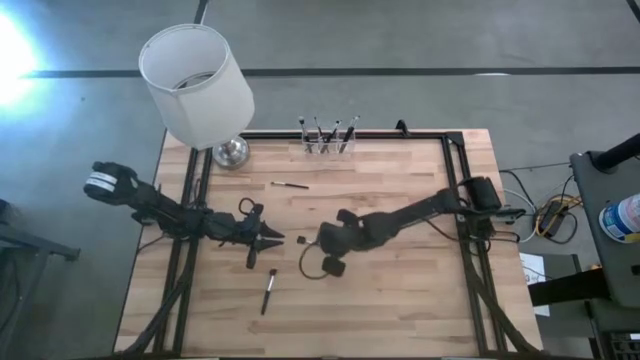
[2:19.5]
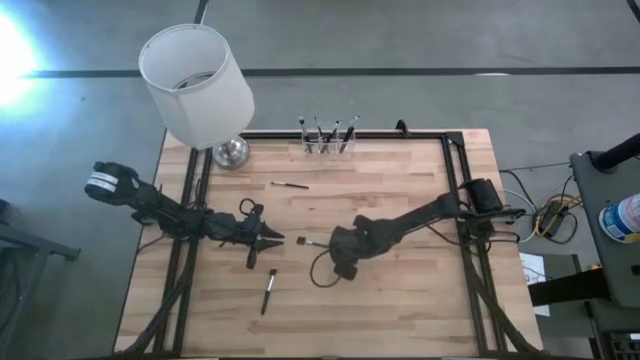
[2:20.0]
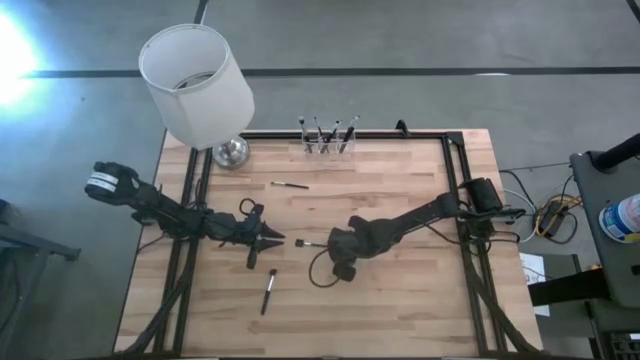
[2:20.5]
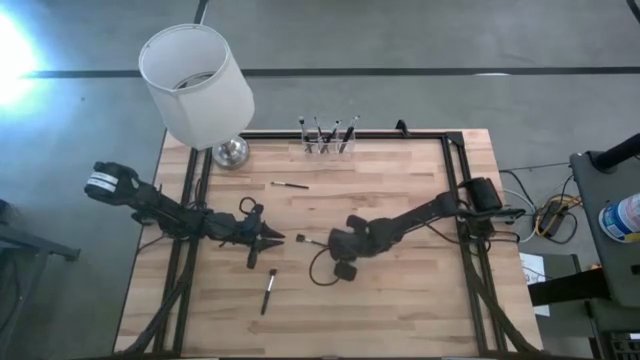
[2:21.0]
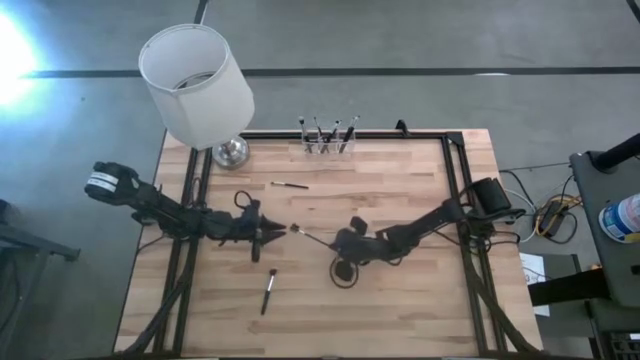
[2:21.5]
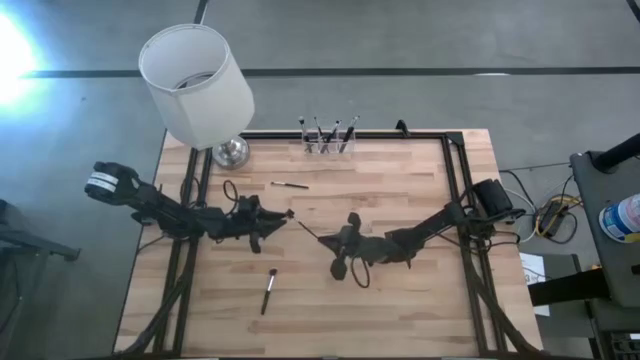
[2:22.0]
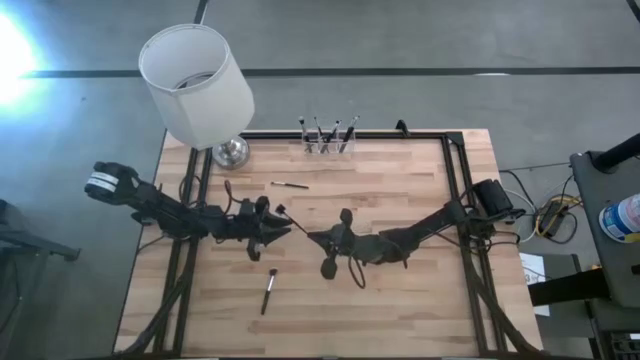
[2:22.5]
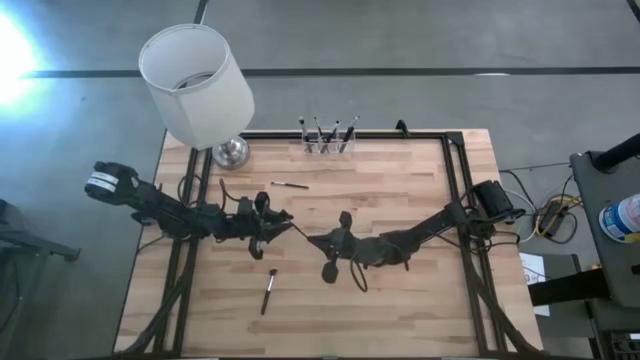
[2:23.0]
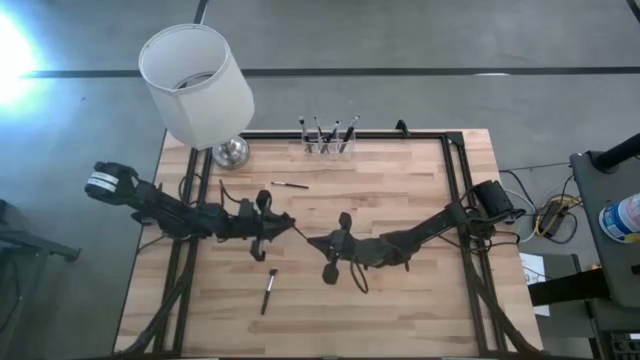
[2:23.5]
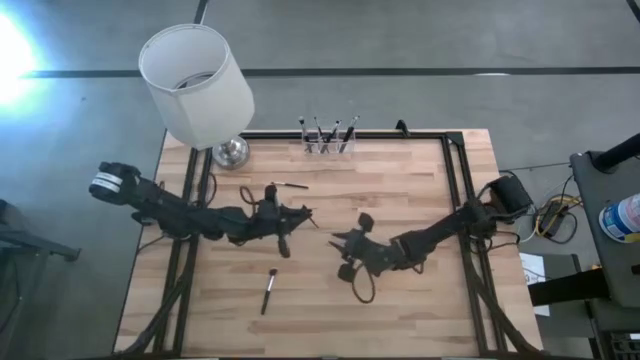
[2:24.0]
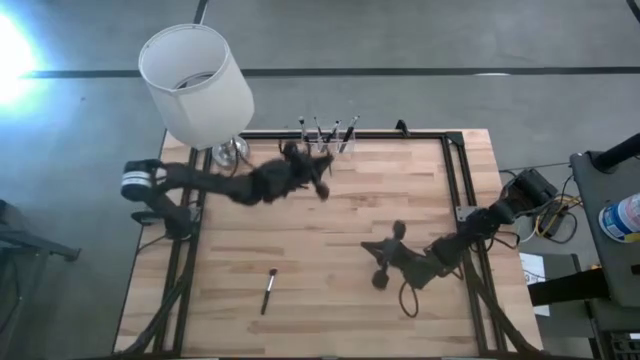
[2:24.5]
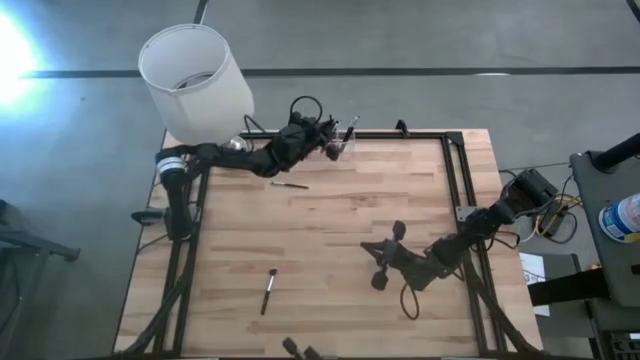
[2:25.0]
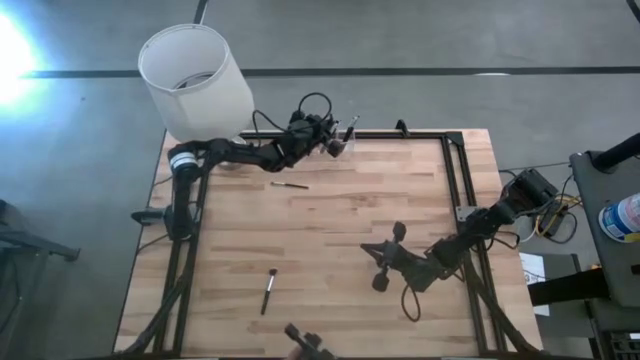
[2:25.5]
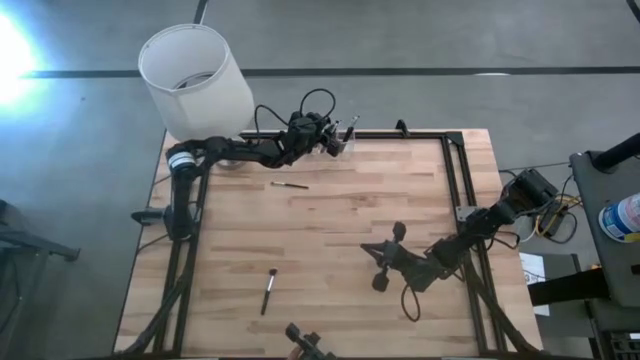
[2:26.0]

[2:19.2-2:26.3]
Task: Put items in baskets/containers
Put the eye groomer brush into the transparent organizer

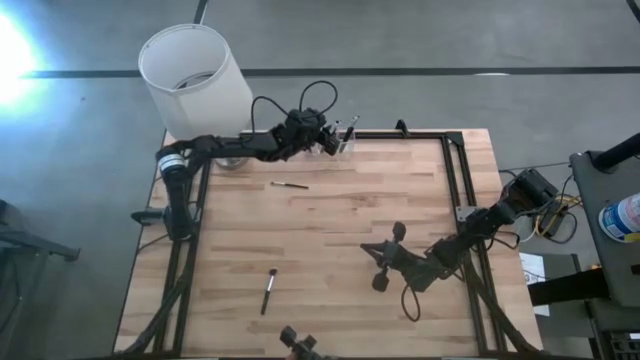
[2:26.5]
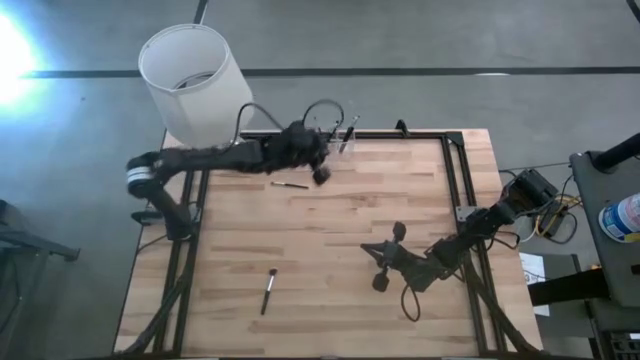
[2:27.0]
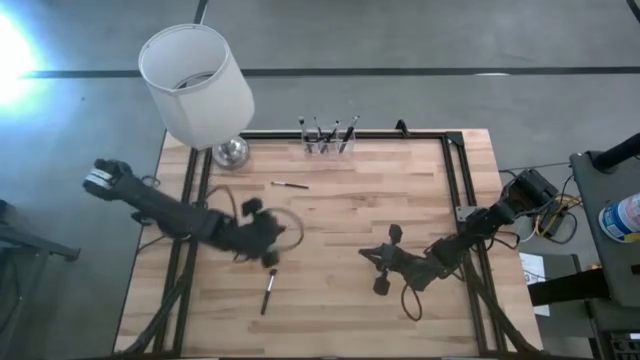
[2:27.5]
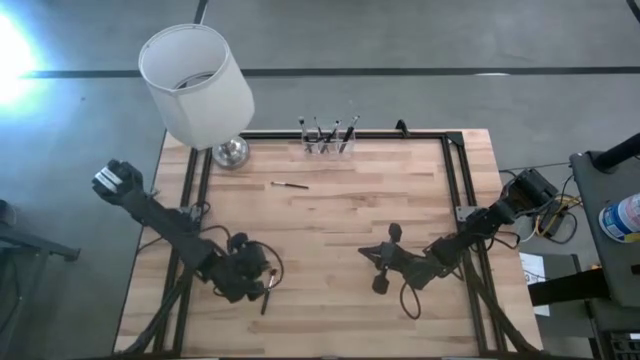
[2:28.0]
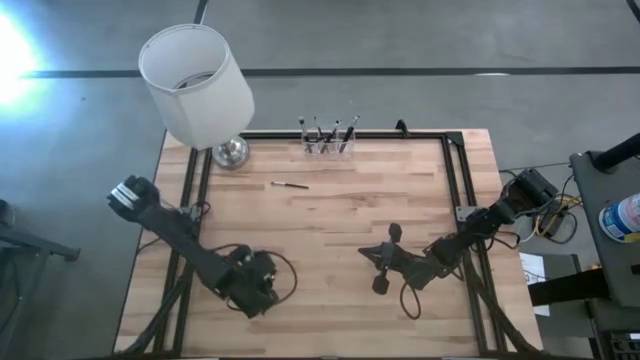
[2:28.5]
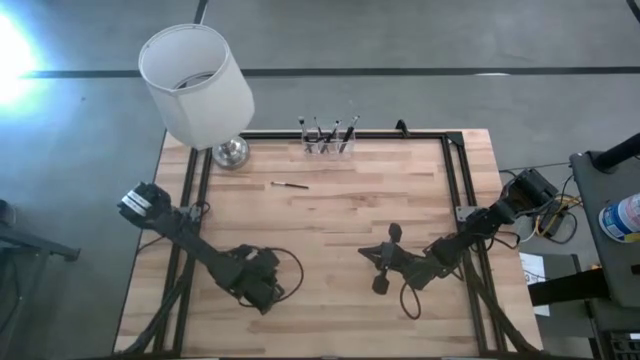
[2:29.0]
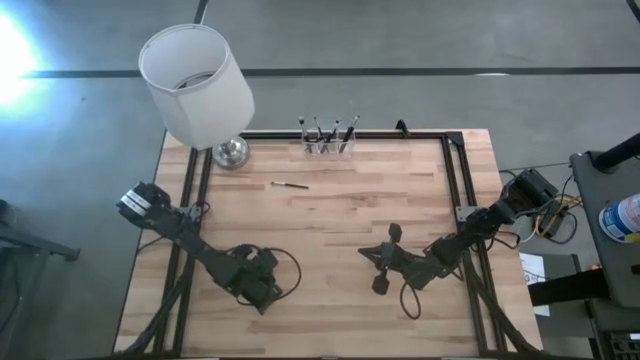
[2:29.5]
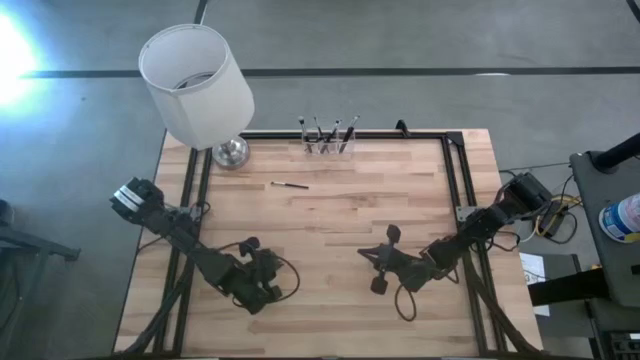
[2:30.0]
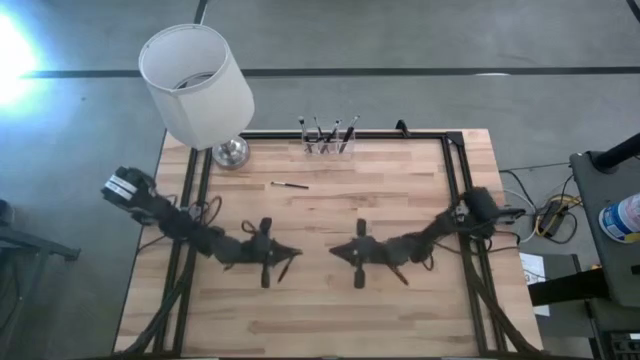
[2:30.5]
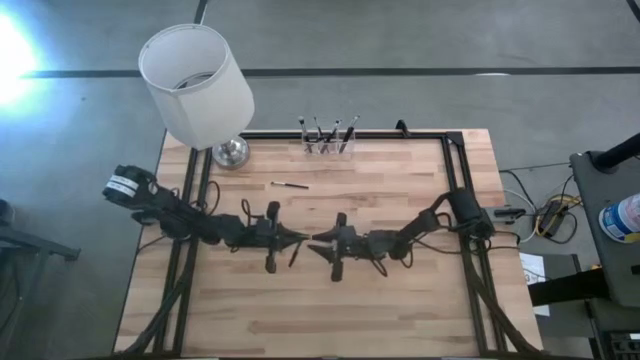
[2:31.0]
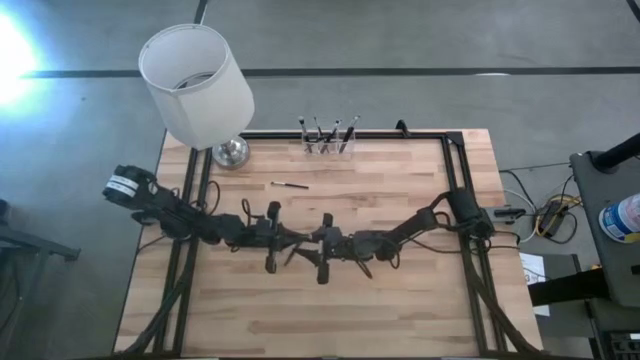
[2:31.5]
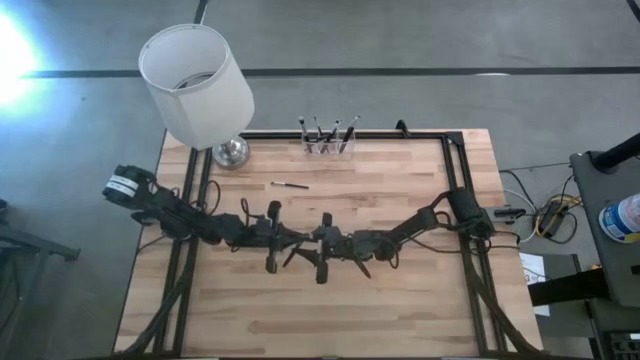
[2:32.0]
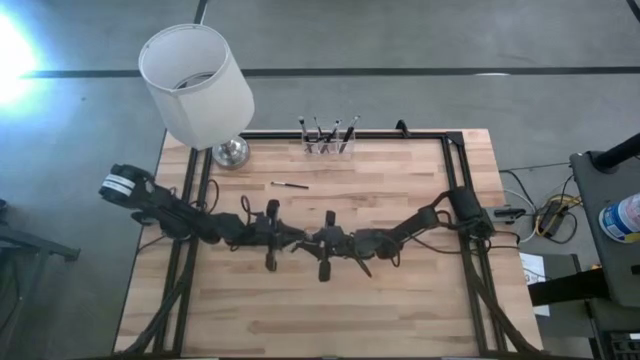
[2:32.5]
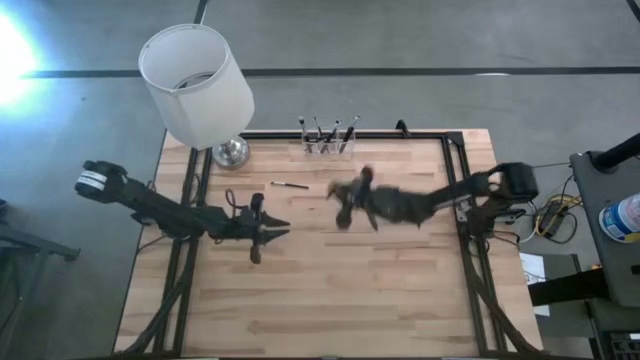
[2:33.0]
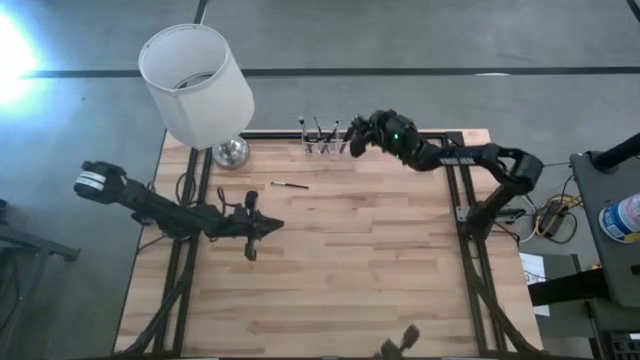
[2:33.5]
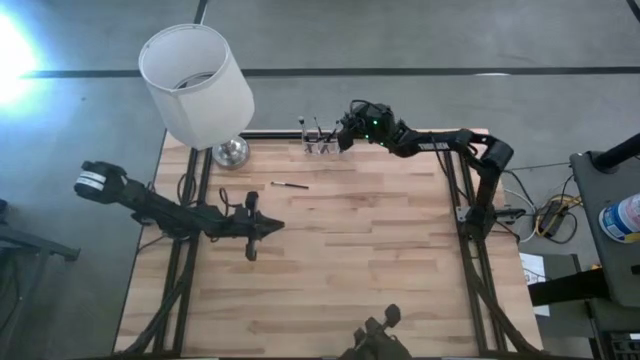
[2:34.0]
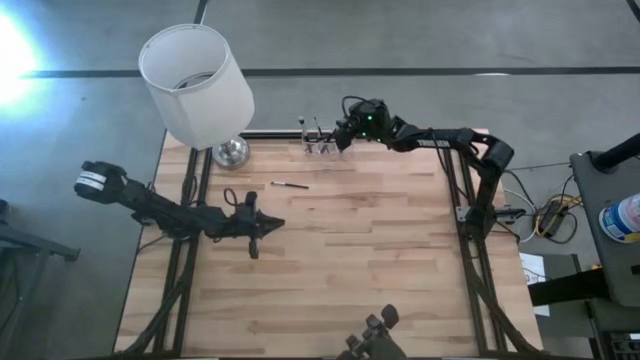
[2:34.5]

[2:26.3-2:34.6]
Put the powder brush into the transparent organizer

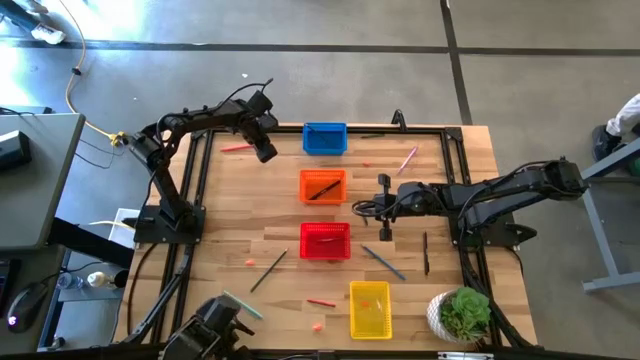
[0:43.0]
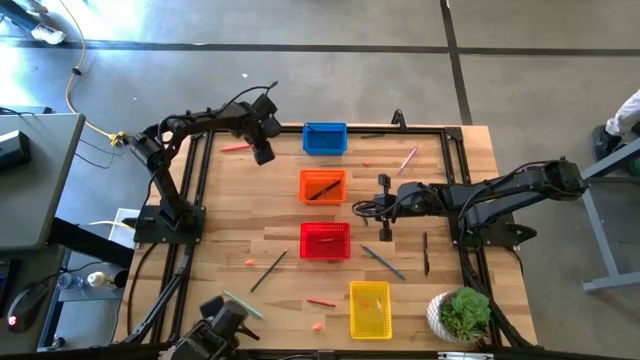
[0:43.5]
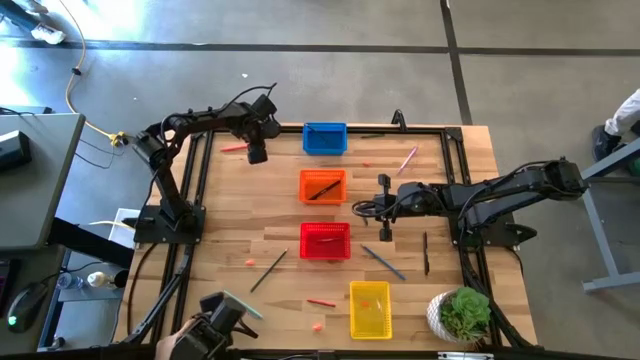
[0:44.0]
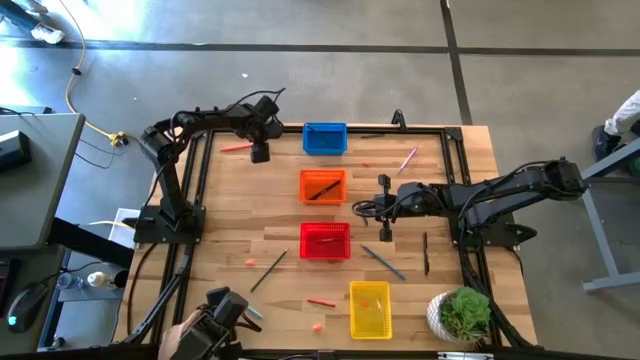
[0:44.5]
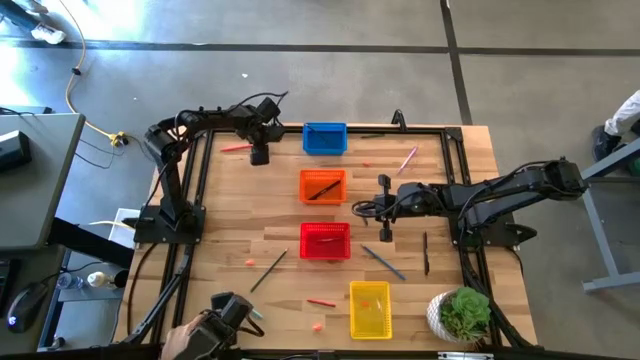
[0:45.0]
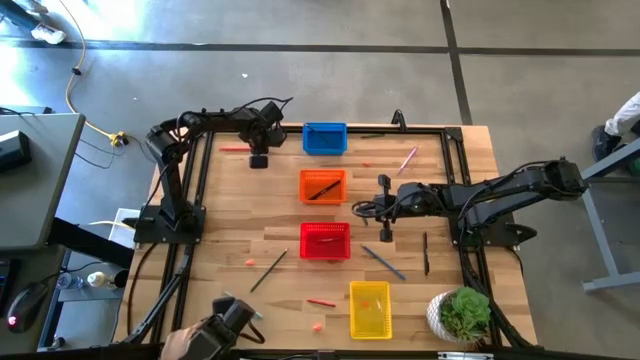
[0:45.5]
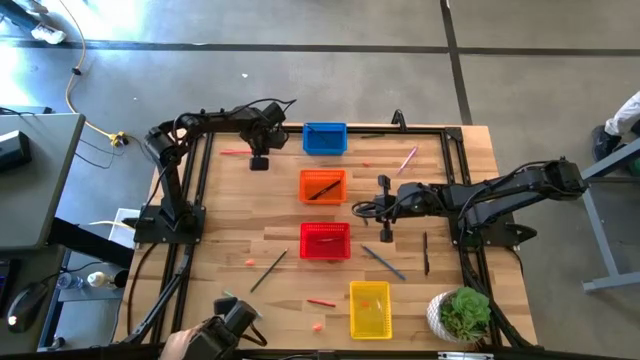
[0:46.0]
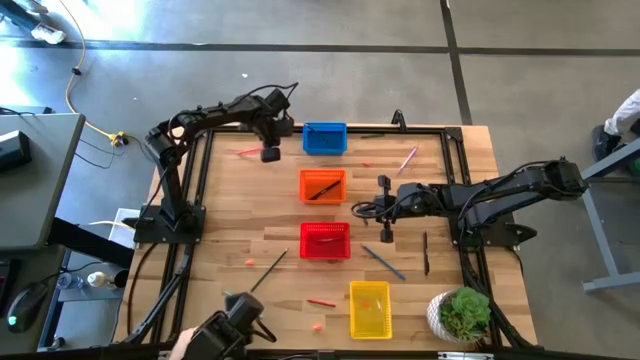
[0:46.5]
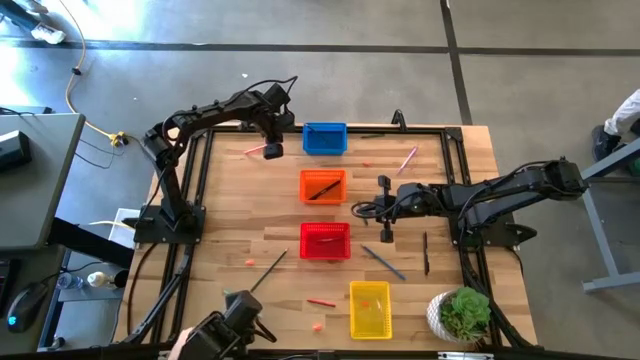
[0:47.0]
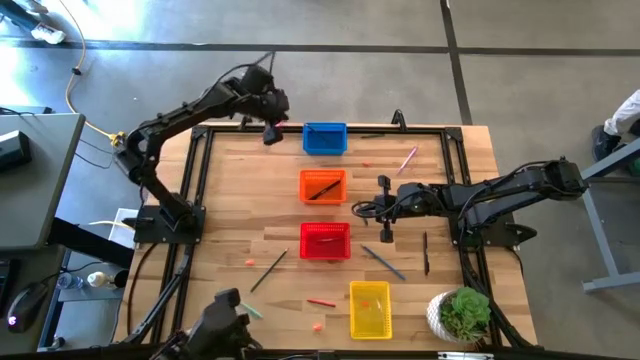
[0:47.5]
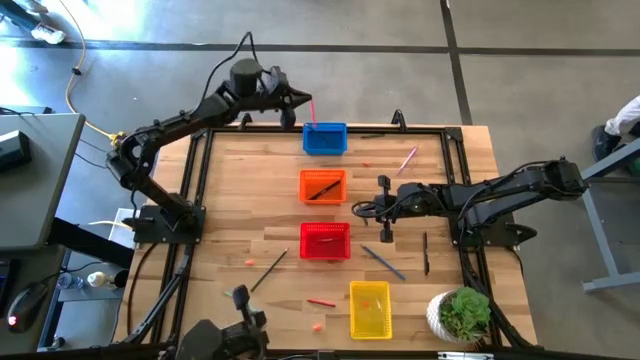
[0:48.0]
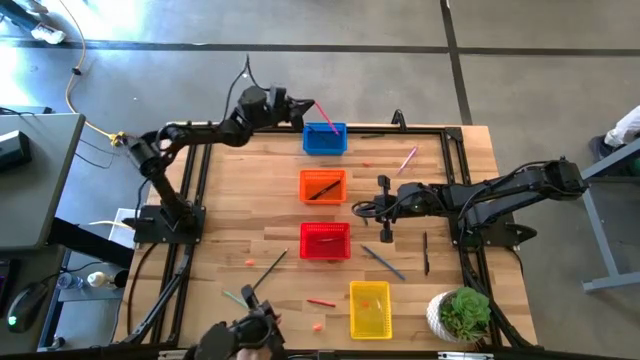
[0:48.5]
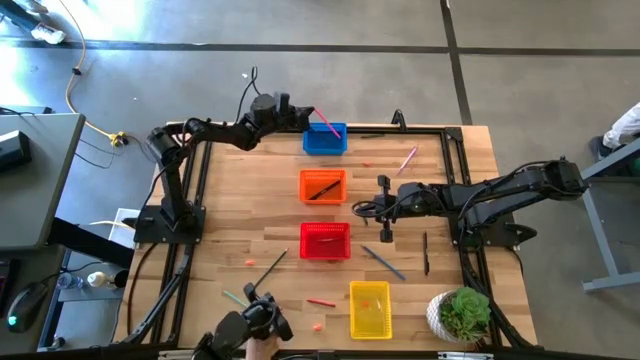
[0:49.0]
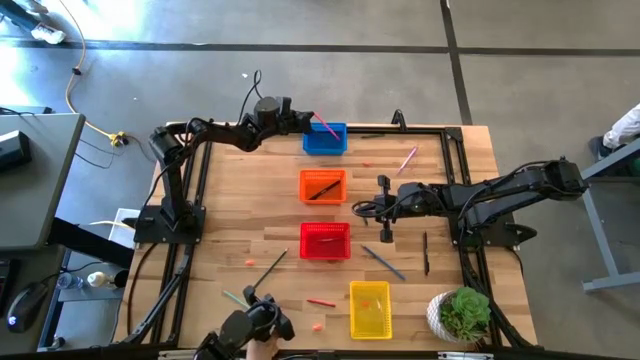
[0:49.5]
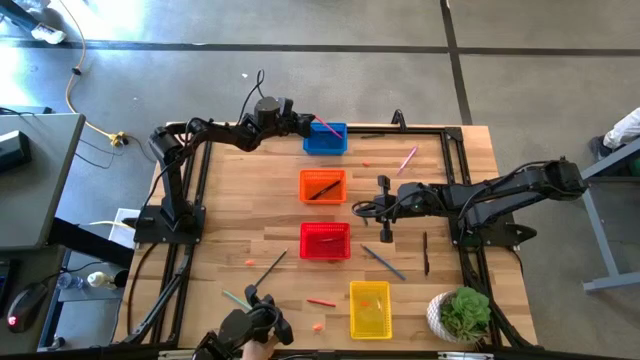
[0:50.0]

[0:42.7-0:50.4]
Task: Sort crayons/erasers/pens/pencils in bins
Put the pink pencil into the blue bin
